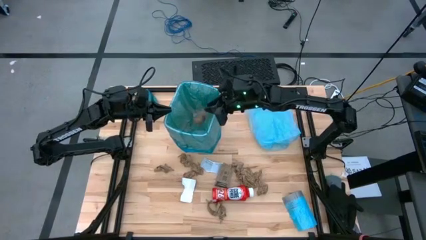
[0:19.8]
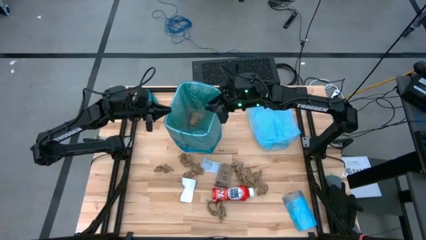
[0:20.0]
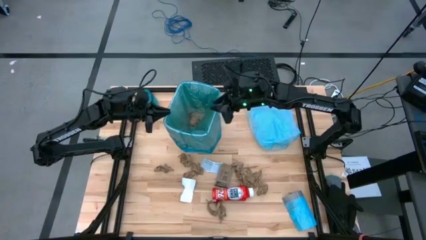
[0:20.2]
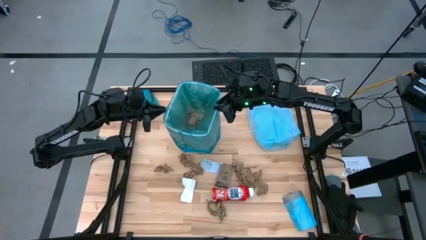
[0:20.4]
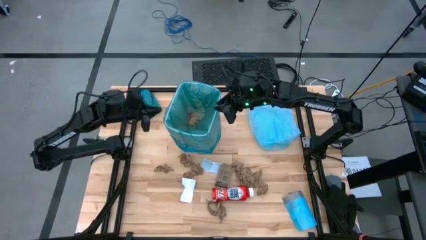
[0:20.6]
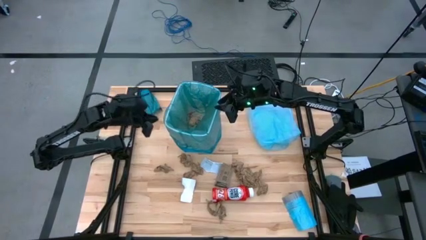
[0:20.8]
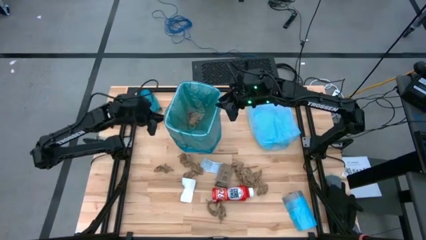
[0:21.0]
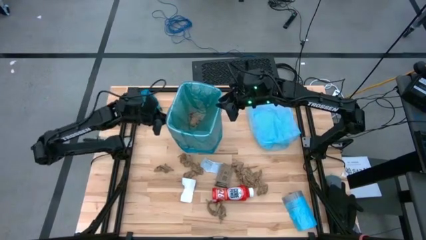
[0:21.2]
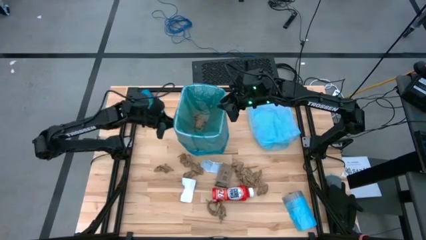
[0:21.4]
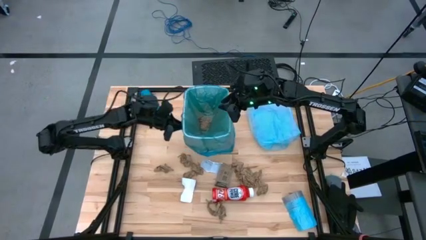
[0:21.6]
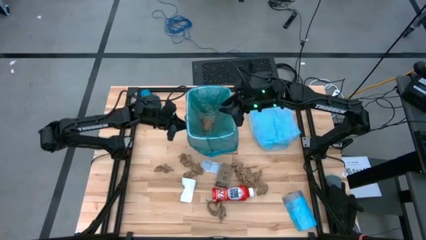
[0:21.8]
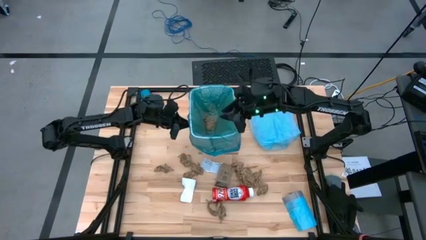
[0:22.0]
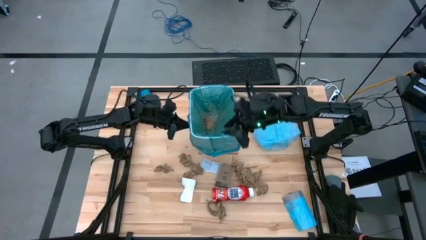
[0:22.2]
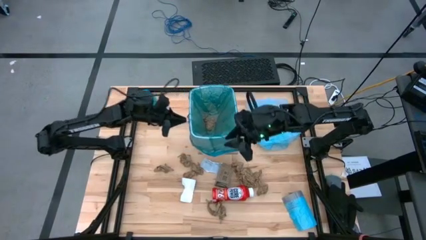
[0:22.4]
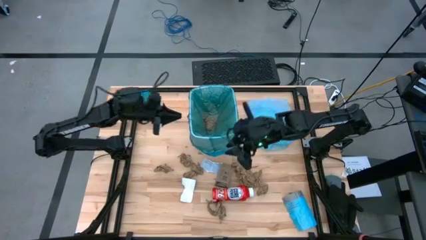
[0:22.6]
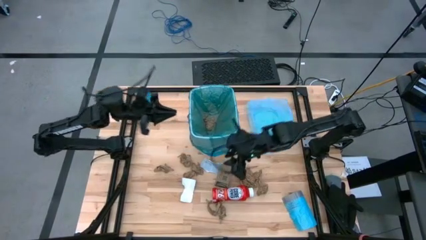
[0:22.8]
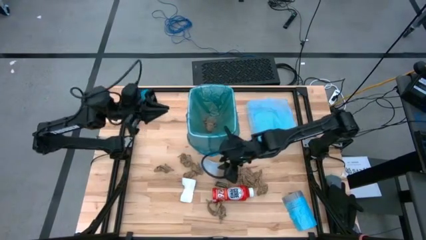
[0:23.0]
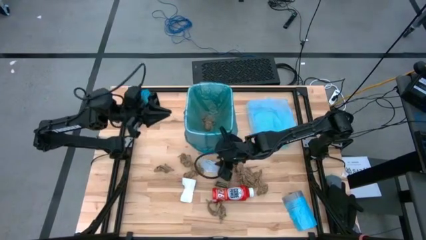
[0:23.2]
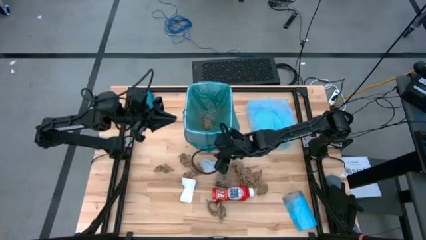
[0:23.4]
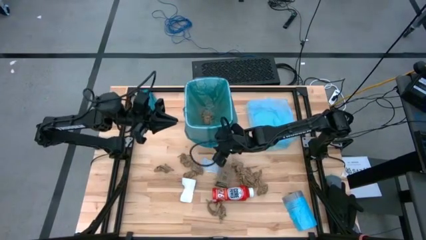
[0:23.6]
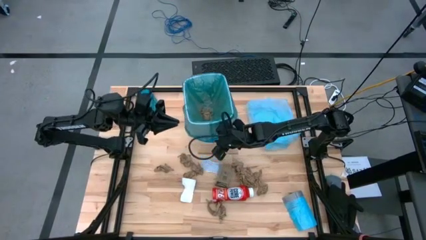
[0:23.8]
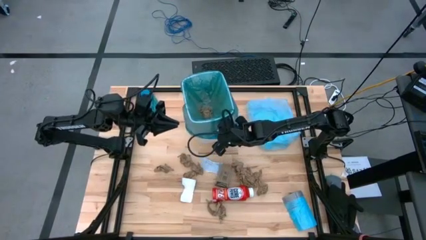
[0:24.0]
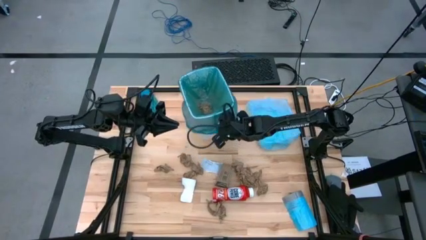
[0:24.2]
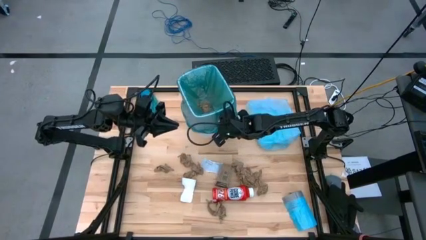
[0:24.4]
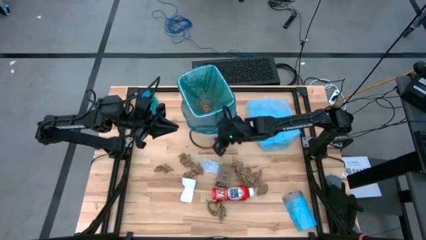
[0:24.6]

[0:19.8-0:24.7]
Task: place trash/remove bag and relplace
Move the white trash bin to the top center of the table

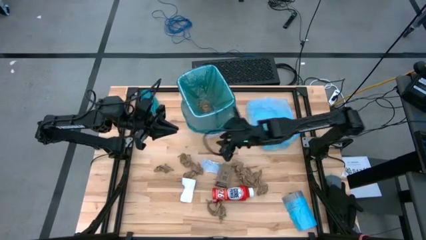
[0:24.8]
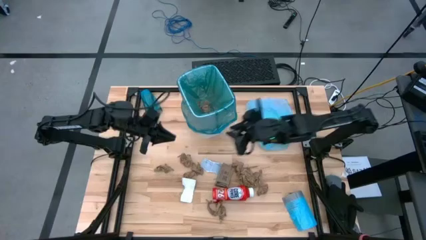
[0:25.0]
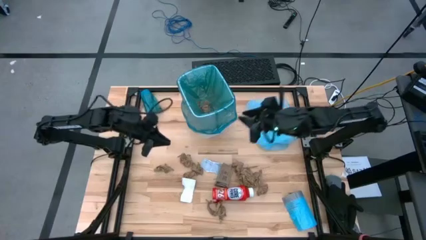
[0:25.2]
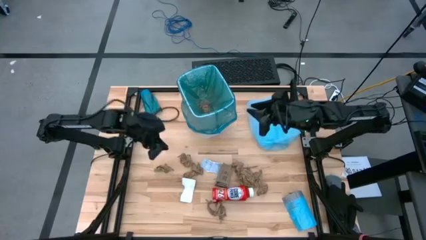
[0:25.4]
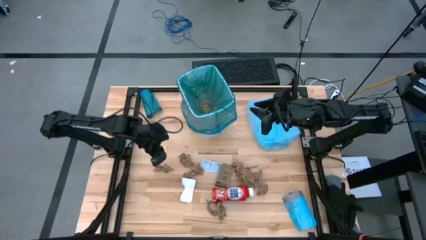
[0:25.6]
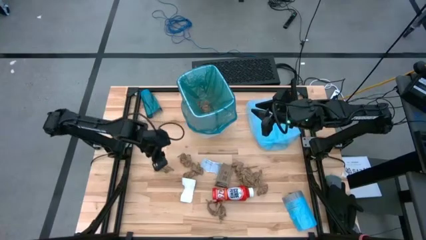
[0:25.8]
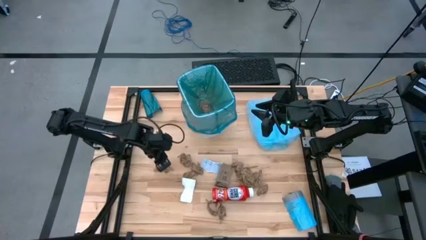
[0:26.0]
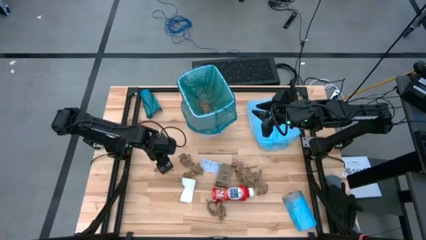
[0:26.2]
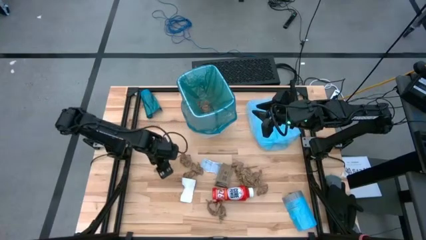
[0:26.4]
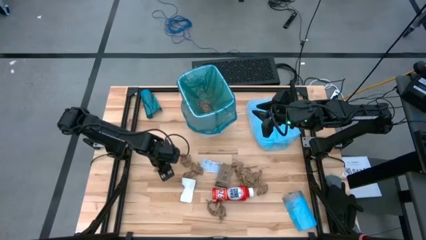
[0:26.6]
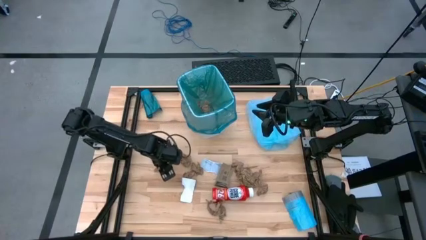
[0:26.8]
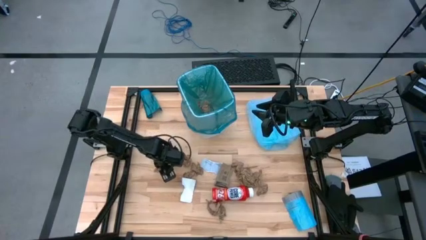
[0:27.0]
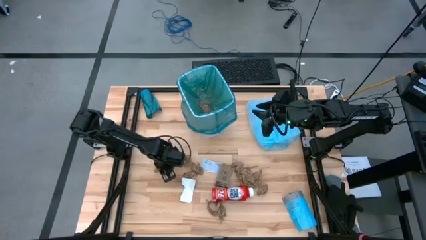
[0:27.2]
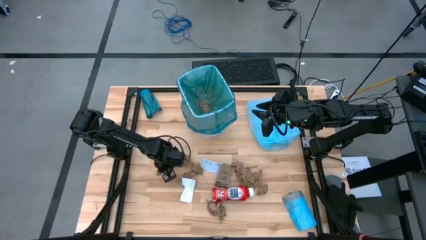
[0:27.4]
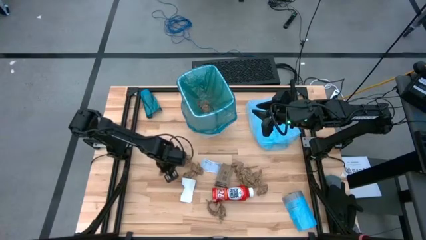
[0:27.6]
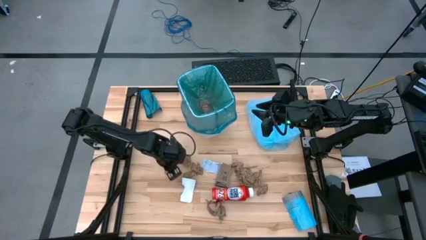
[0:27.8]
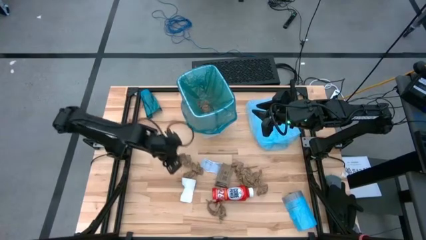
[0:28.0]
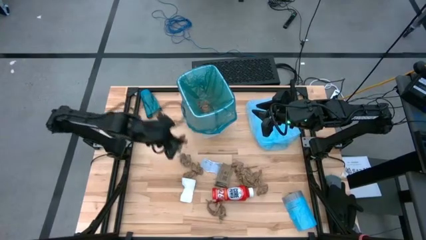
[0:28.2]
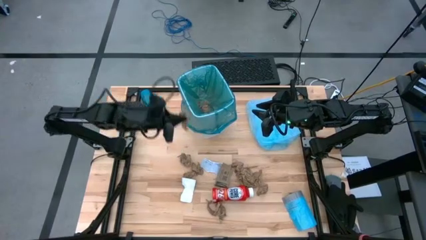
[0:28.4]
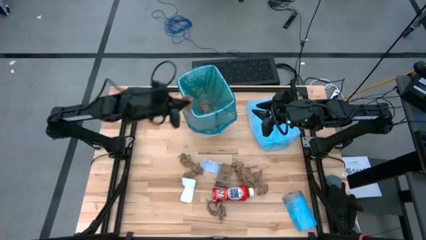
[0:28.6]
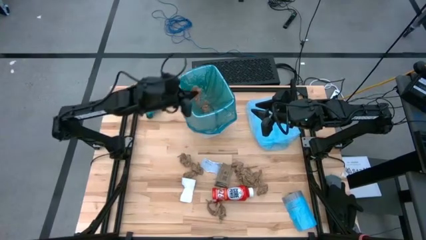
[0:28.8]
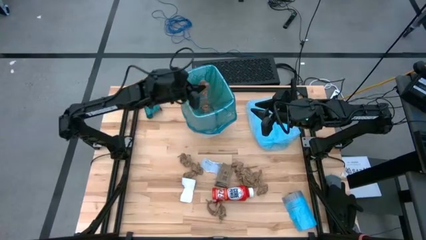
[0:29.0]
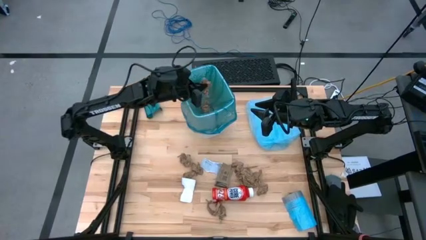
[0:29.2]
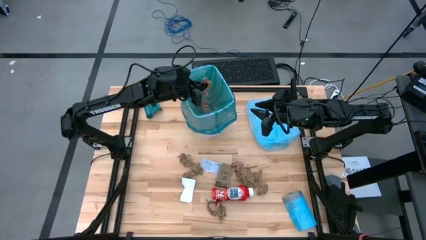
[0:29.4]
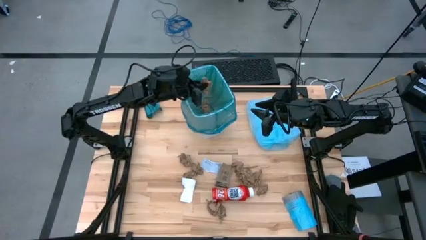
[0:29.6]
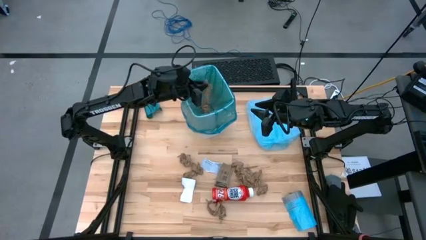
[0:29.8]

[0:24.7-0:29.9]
Put the brown paper into the blue trash bag inside the white trash bin

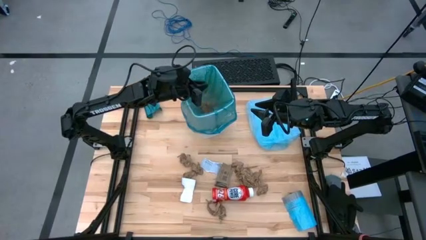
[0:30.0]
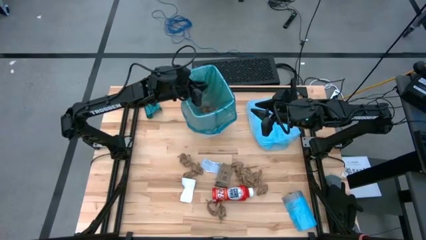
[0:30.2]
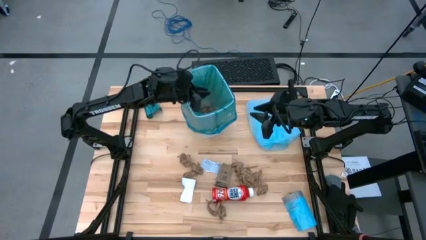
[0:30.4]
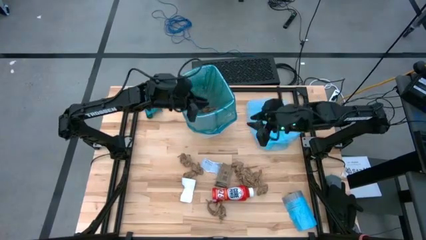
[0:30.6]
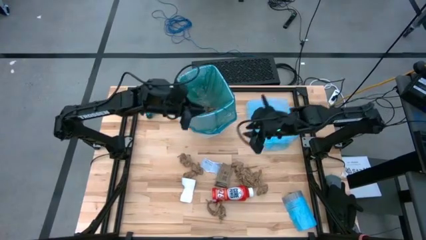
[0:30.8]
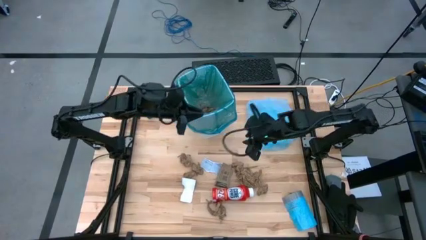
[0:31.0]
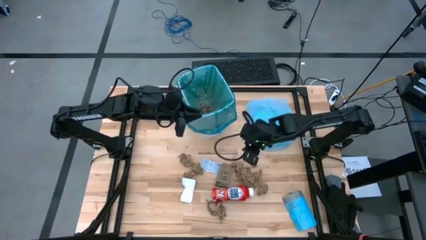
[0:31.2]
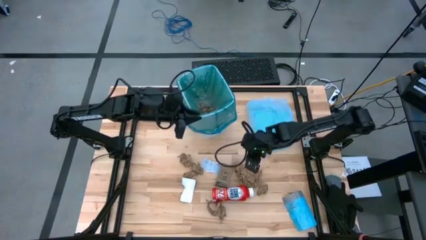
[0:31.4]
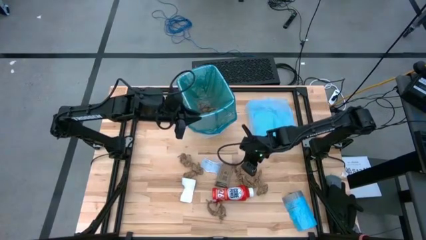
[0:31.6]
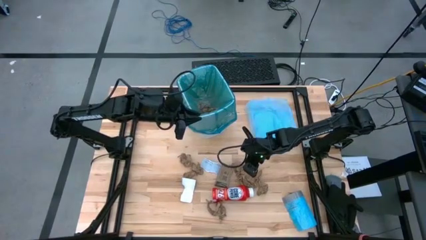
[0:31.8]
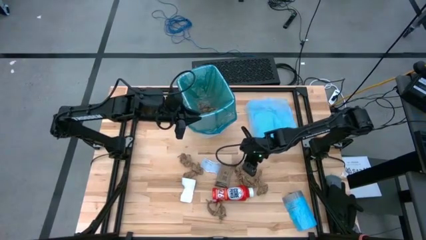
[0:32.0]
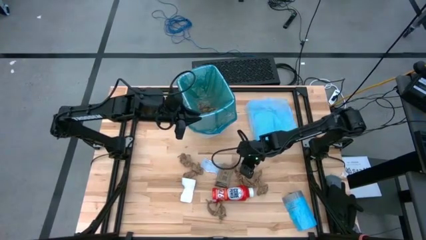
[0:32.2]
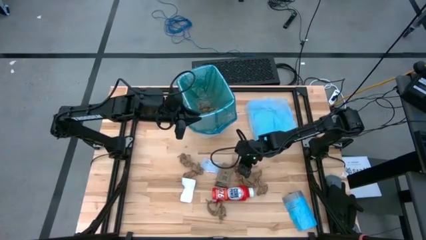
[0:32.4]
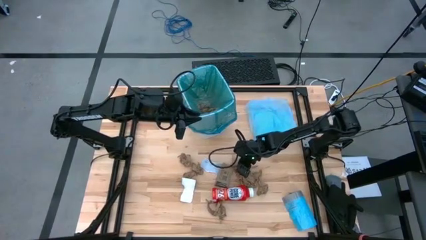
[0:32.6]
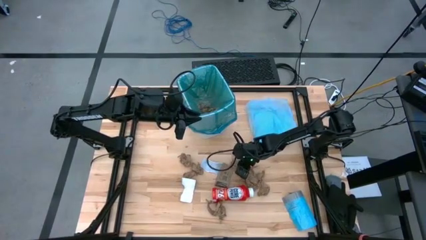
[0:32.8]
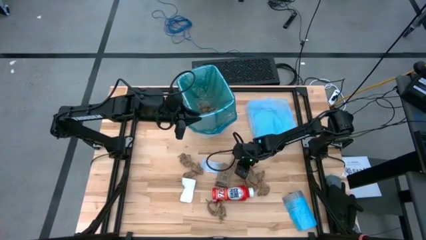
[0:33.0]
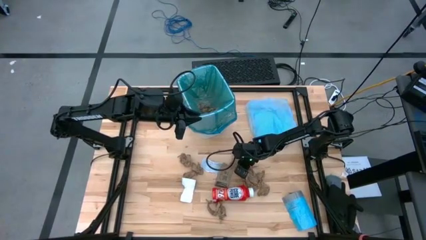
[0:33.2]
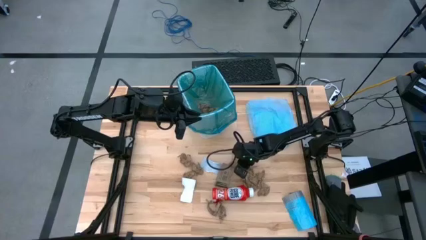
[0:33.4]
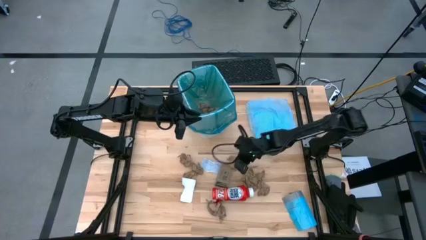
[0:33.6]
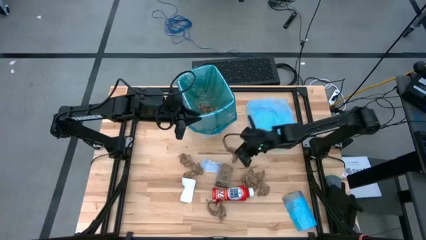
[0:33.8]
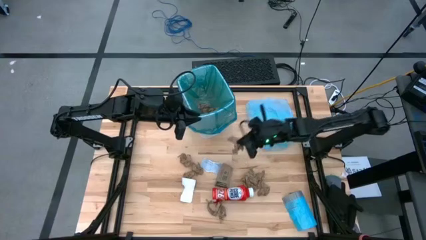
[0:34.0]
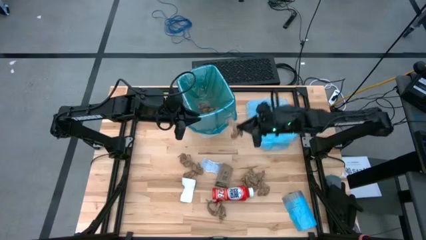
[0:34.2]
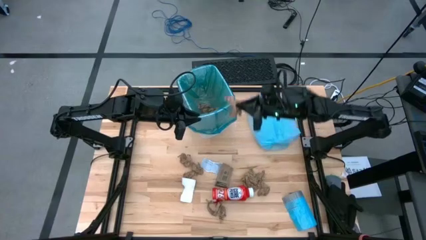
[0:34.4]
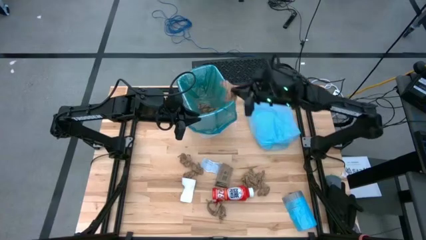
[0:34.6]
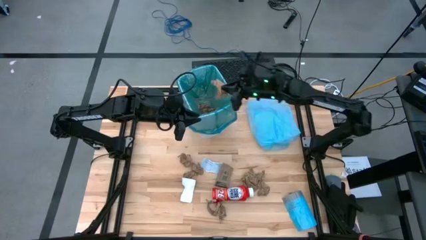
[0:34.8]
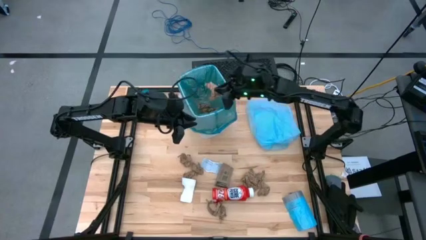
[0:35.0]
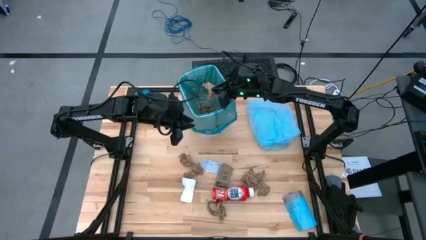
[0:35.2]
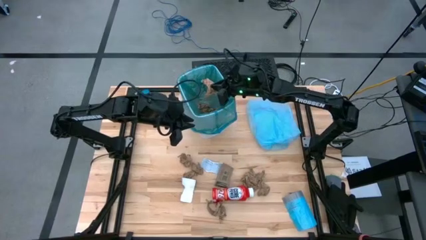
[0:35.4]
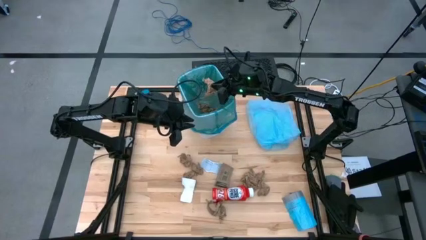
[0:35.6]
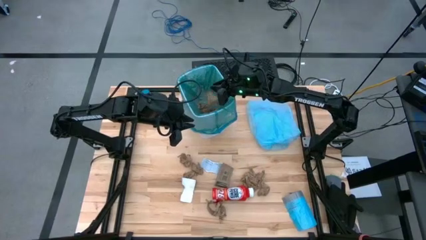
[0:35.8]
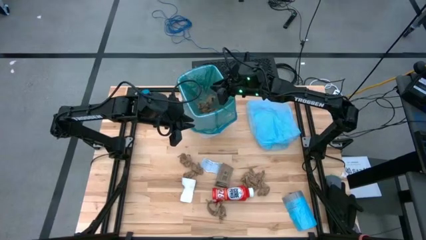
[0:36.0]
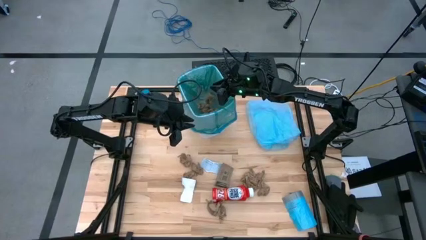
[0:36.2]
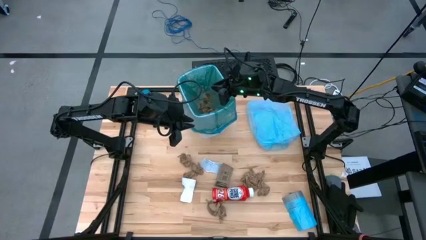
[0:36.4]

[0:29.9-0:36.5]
Put the brown paper into the blue trash bag inside the white trash bin
